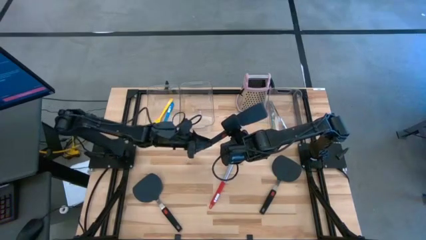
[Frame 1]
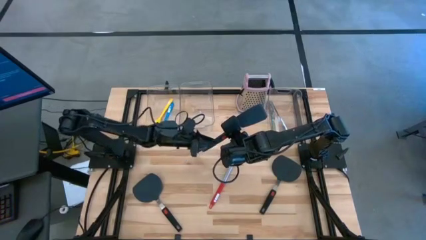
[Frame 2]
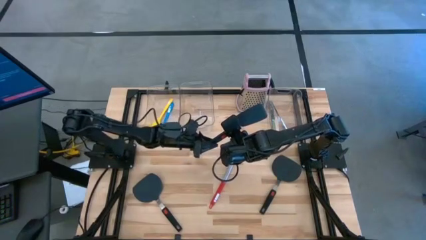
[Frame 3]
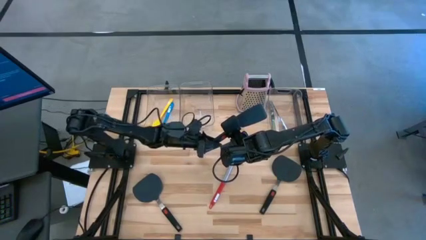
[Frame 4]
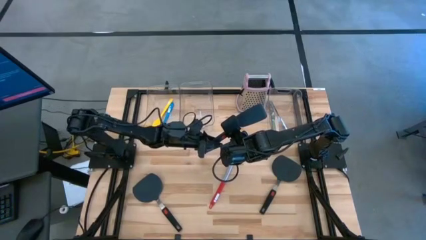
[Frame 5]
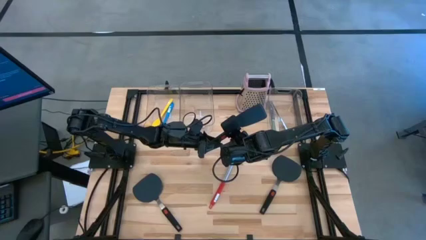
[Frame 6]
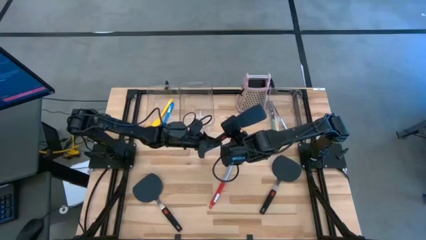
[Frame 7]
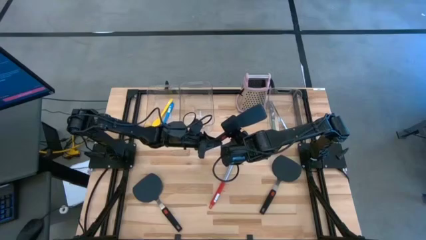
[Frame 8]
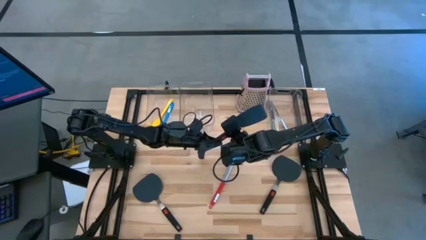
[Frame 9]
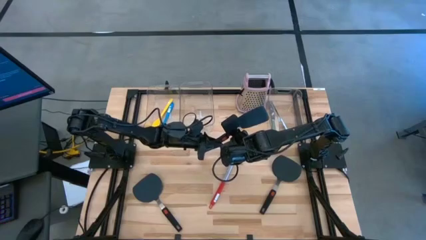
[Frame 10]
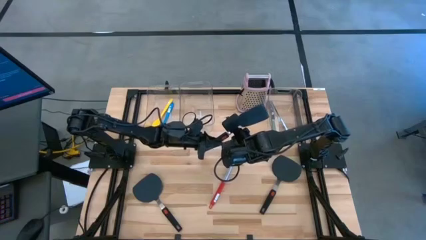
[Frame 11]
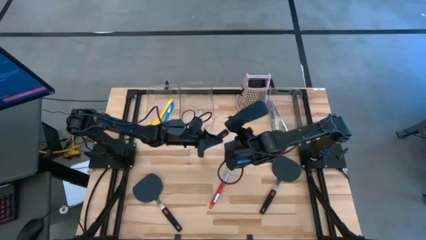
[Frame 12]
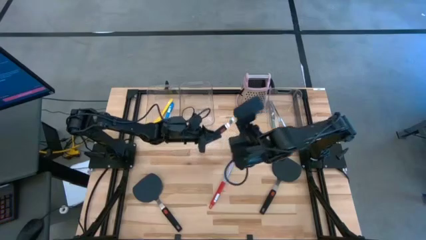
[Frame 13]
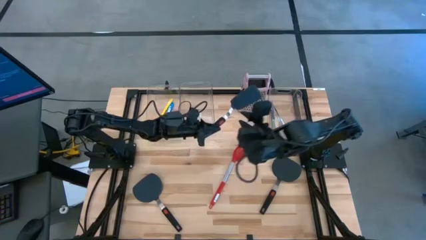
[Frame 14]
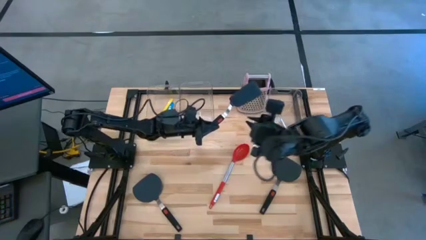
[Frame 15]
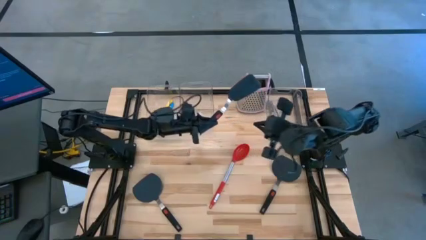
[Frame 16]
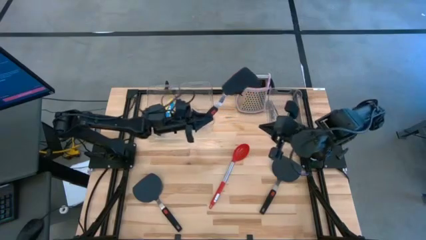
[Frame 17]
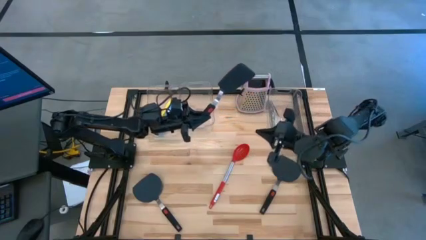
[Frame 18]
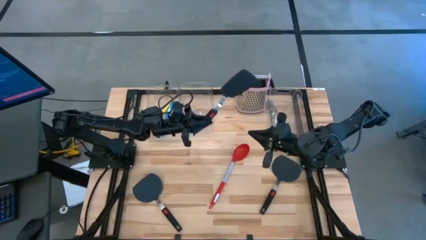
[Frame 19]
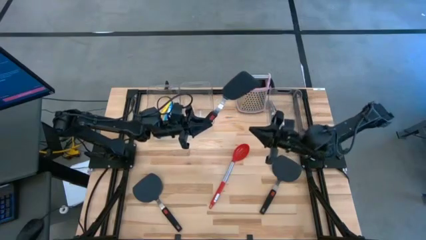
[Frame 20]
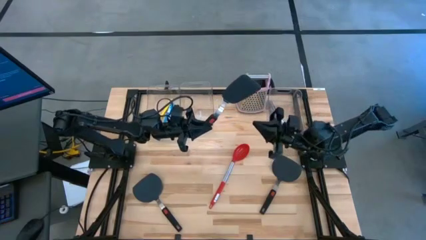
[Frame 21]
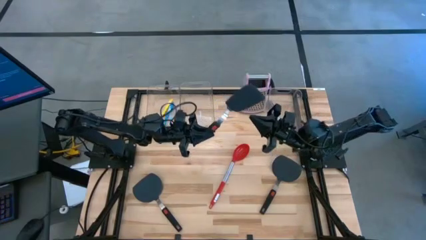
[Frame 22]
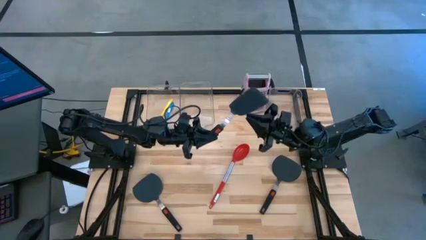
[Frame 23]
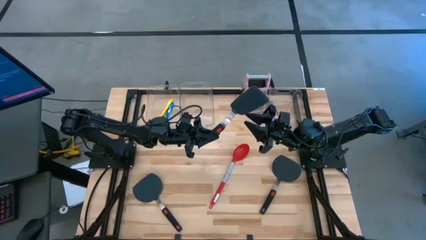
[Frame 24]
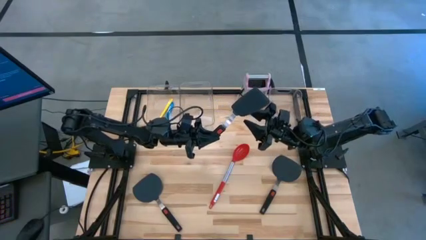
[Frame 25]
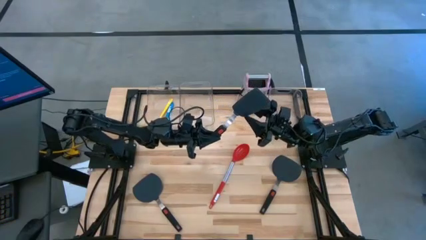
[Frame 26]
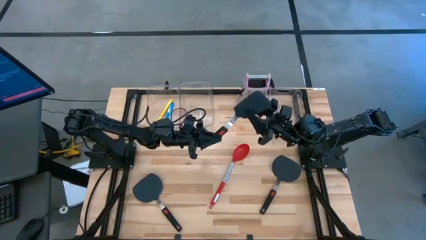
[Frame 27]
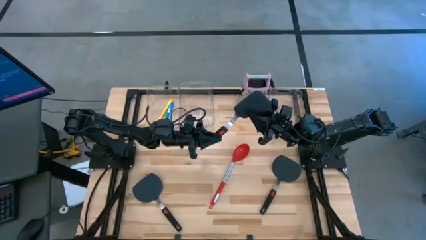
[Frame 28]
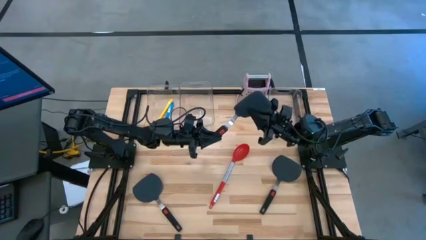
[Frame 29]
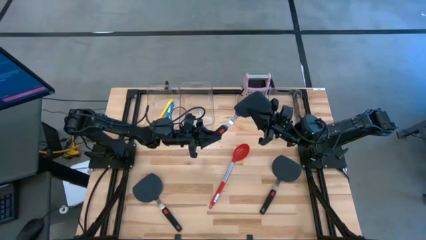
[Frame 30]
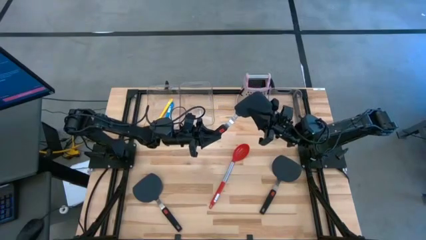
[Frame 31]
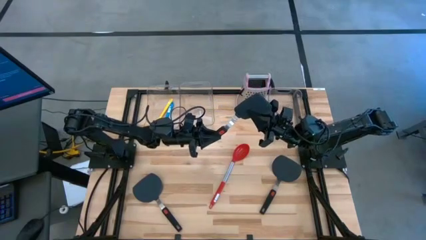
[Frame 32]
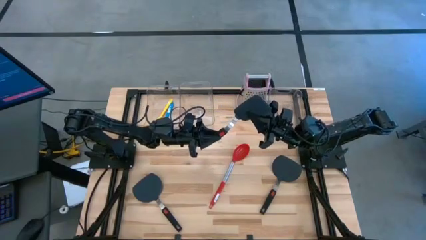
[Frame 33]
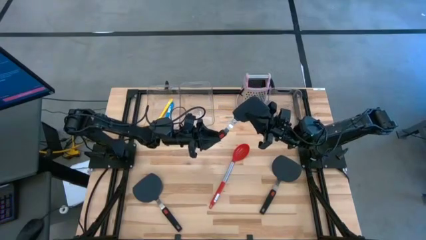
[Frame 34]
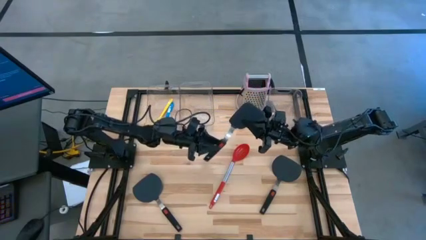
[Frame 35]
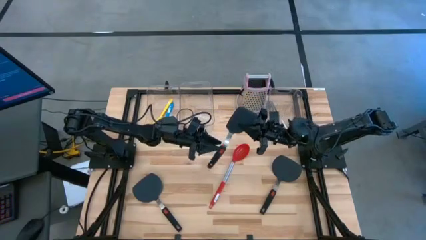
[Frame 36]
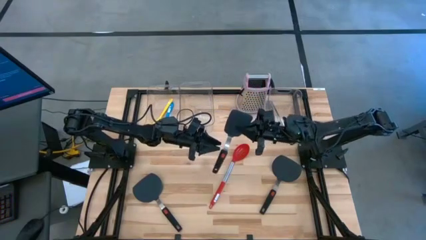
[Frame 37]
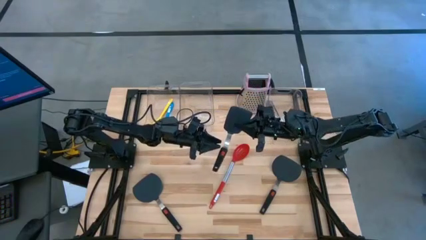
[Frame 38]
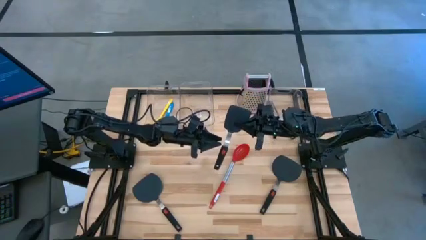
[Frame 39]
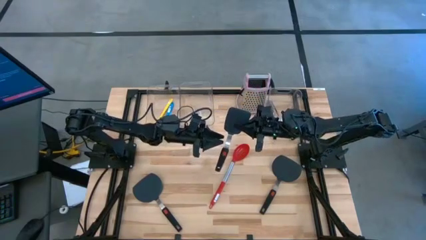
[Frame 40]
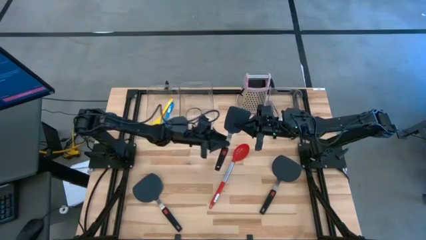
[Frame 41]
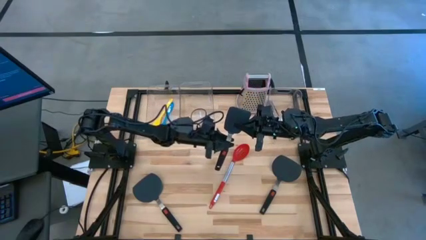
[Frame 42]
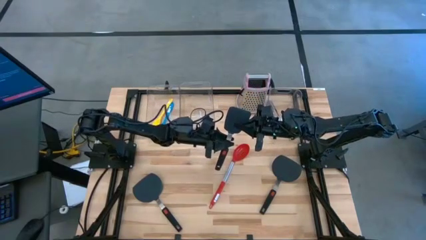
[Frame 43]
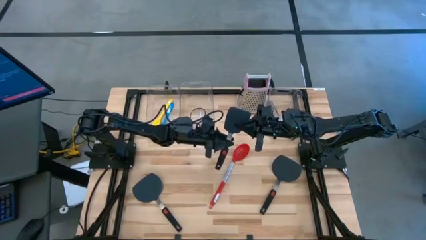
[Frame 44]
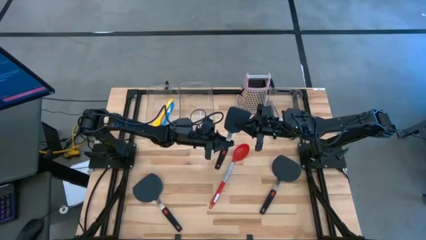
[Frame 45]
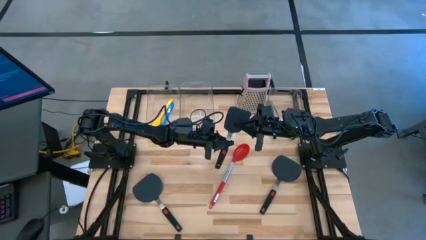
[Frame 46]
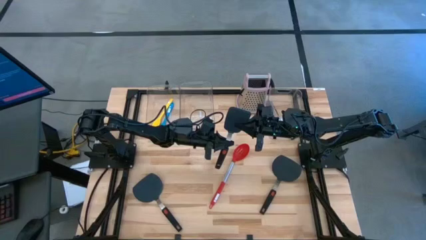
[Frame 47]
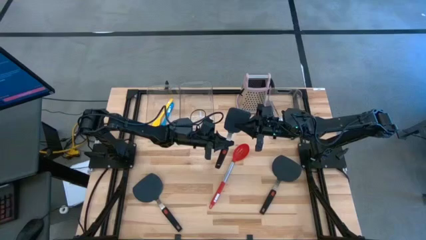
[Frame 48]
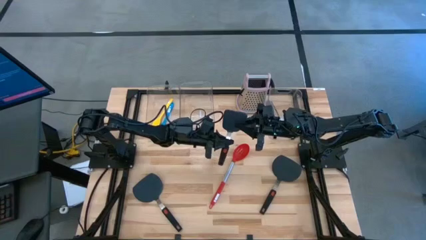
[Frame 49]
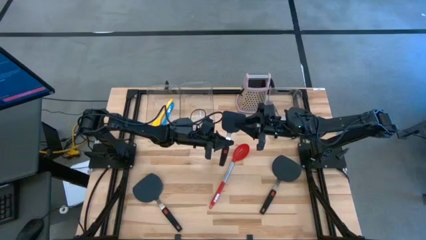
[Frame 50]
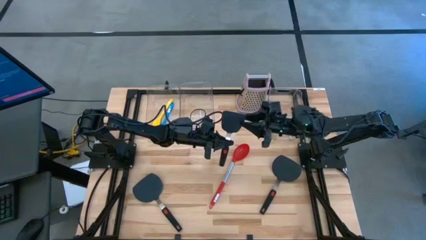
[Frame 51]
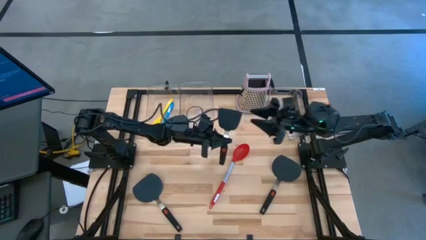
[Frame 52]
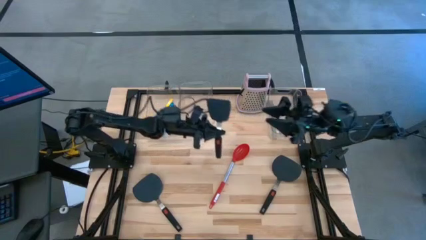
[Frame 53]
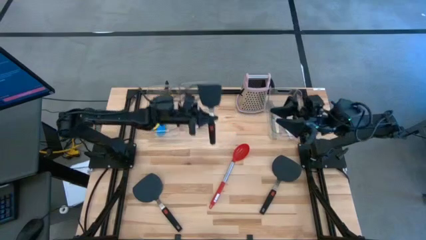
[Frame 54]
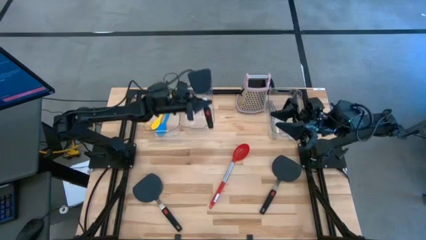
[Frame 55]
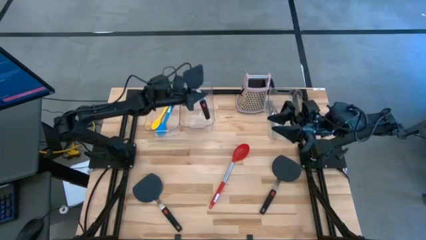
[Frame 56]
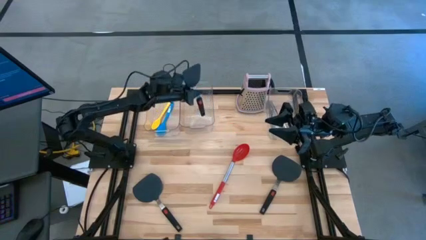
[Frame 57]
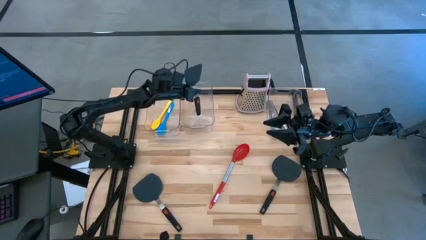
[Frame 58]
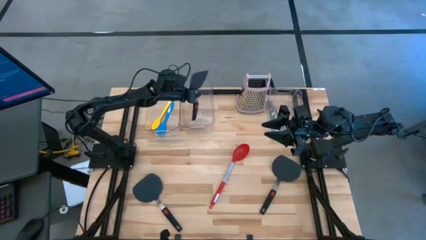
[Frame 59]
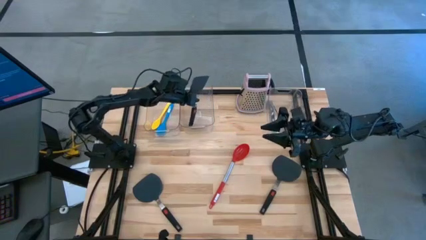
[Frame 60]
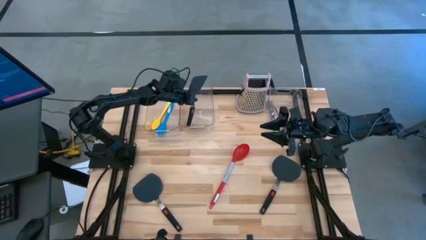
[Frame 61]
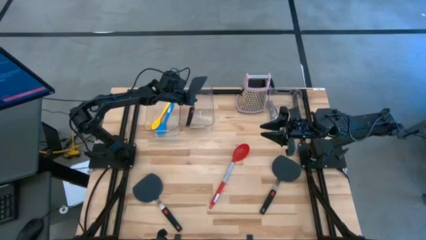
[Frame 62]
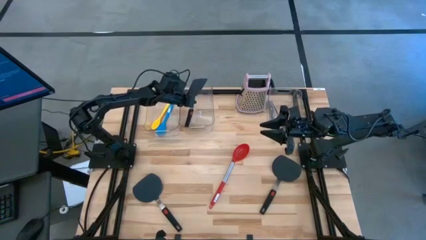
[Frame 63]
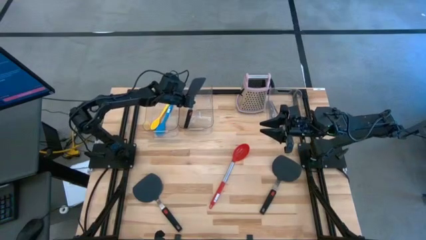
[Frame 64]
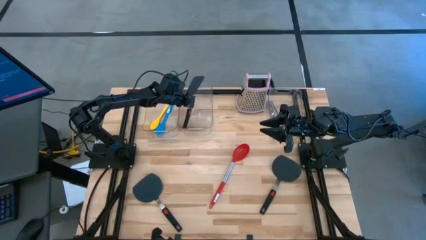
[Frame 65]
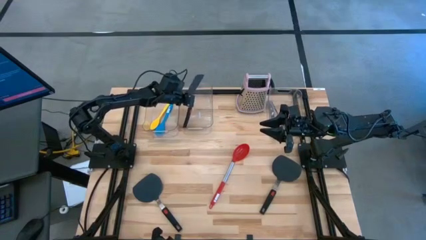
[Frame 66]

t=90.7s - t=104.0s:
Task: Pick & Place Kitchen Items
Put the black spatula into the middle transparent bin

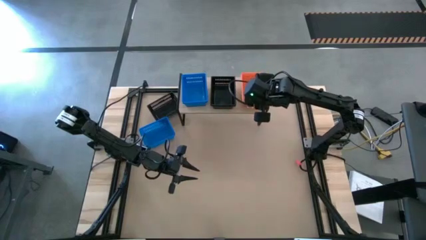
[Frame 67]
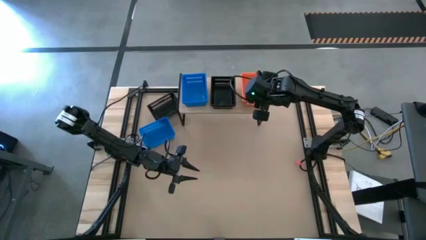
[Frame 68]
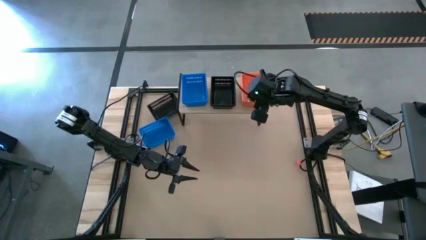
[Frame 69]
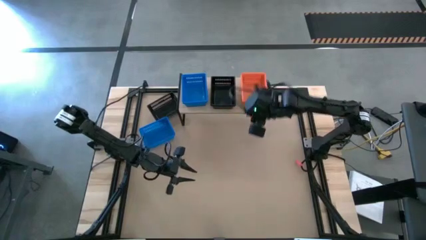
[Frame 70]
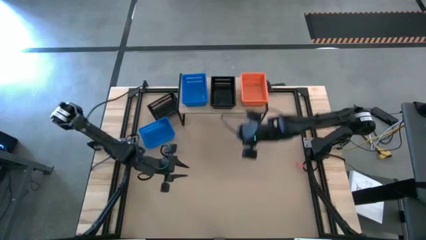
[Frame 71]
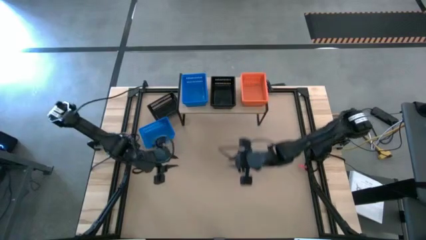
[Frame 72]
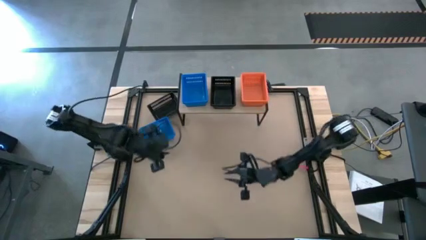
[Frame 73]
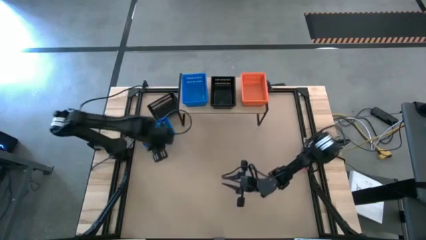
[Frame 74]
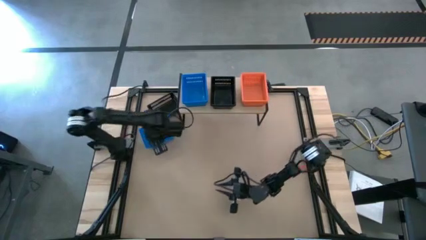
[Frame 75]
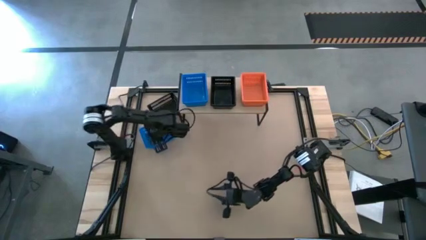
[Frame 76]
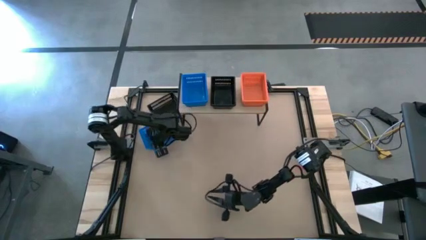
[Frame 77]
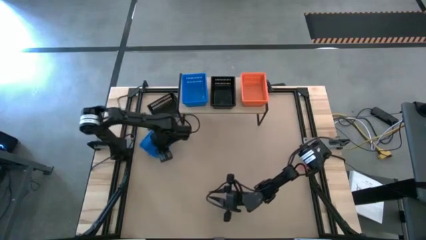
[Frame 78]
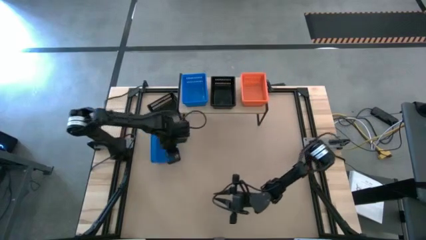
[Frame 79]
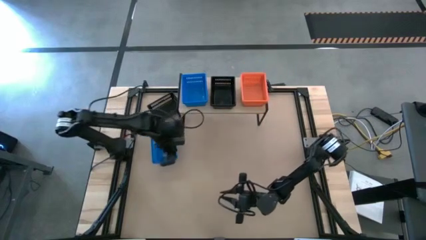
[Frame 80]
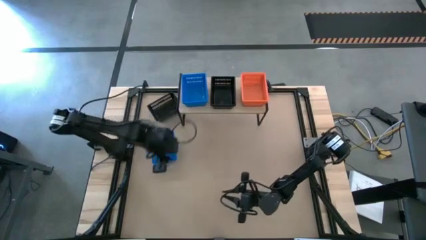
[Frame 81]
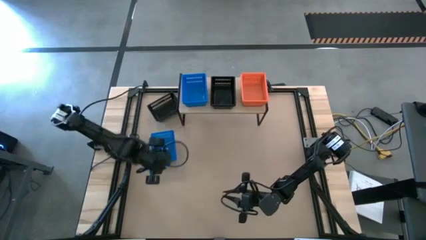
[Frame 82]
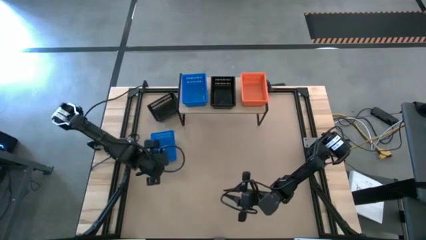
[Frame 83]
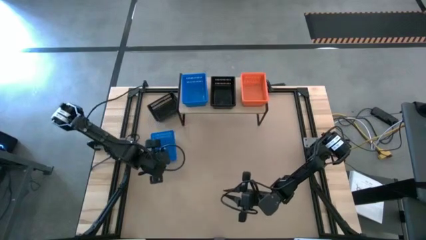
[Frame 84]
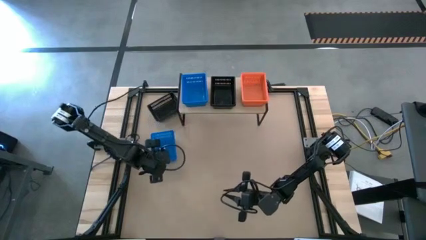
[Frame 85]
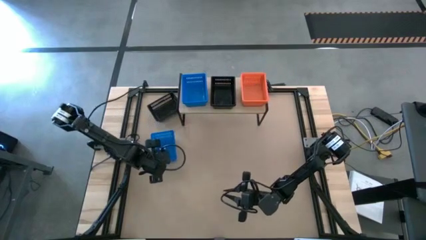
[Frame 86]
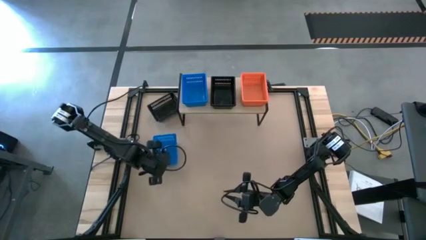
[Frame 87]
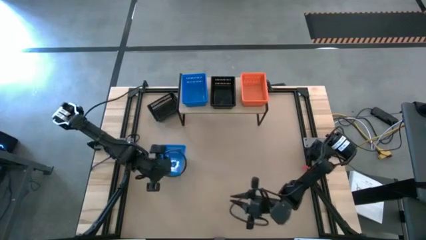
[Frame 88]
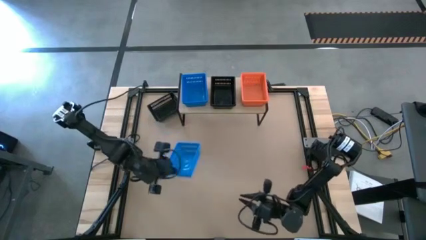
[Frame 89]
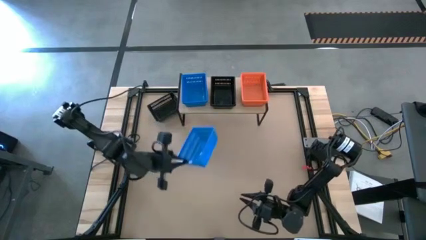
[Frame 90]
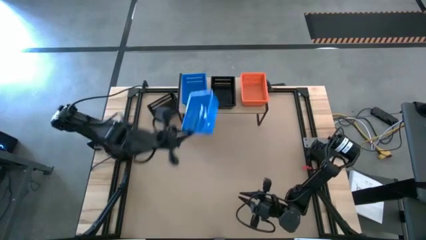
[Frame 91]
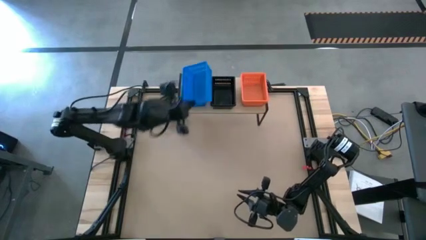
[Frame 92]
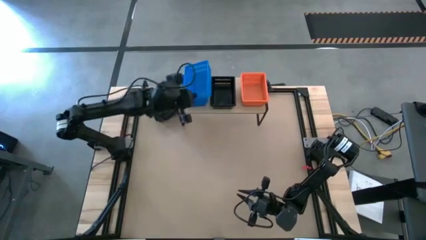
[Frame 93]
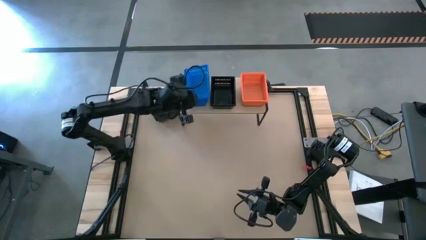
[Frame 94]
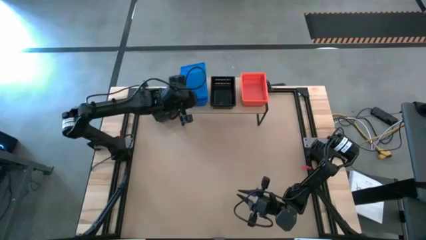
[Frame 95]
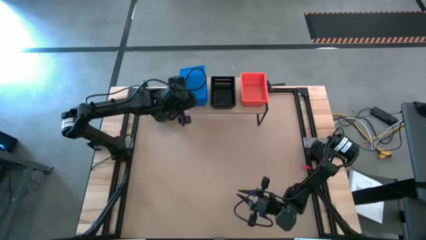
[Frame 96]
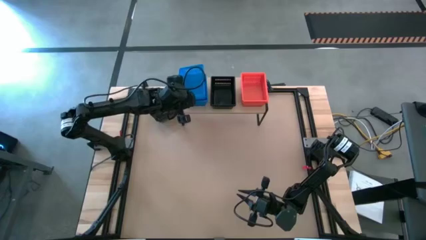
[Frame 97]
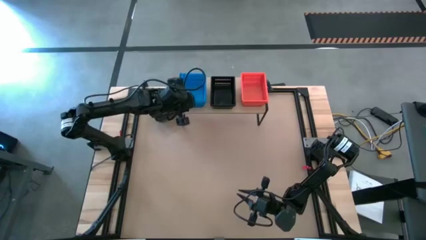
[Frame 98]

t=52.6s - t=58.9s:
Task: Stack baskets on shelf by color
Stack the blue basket on the blue basket on the shelf
